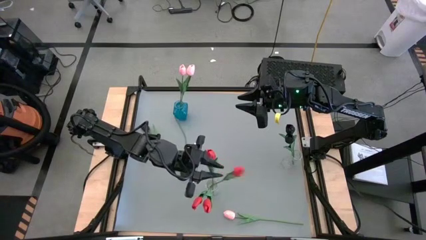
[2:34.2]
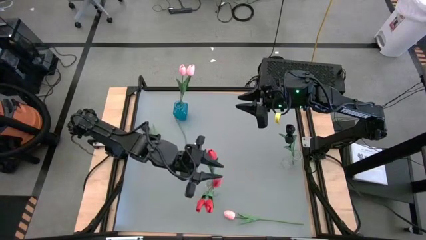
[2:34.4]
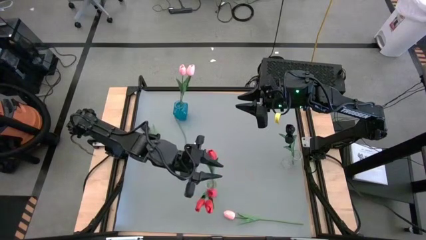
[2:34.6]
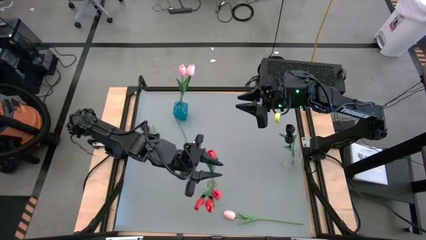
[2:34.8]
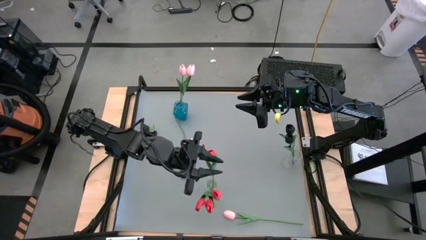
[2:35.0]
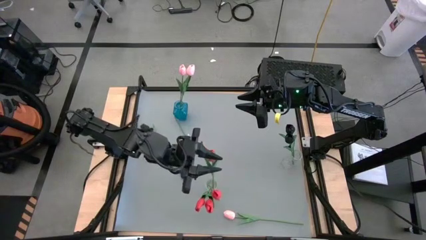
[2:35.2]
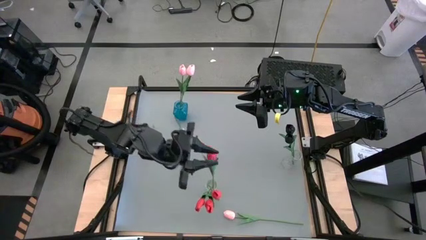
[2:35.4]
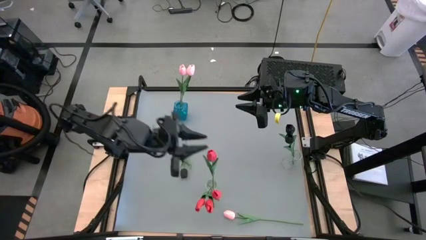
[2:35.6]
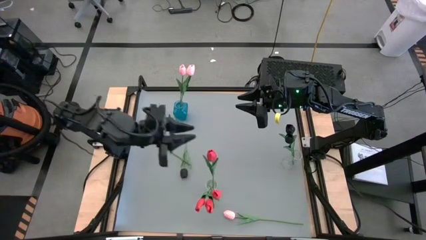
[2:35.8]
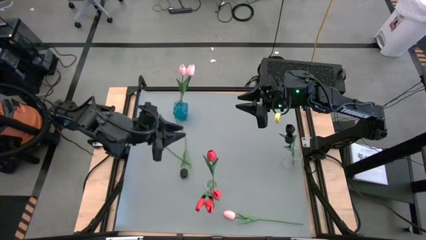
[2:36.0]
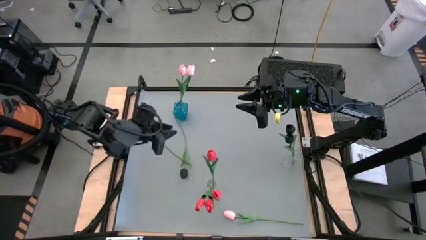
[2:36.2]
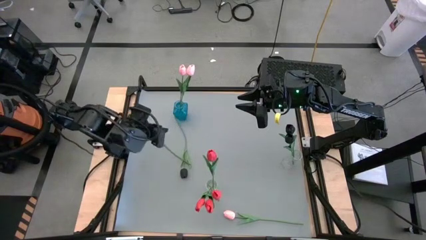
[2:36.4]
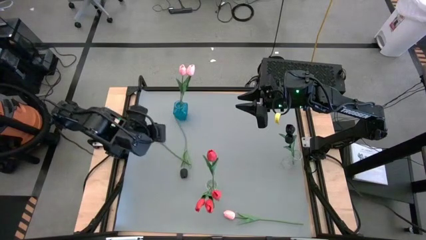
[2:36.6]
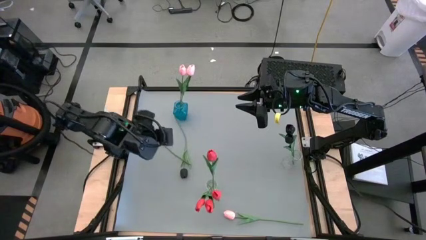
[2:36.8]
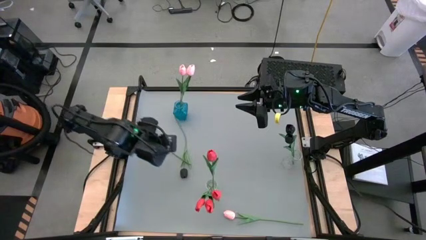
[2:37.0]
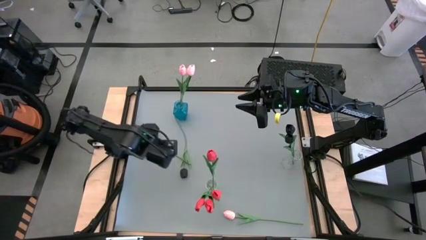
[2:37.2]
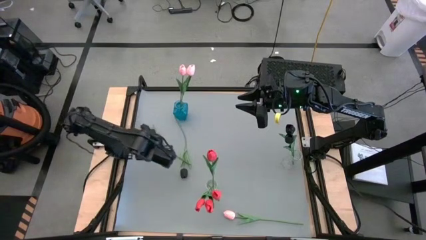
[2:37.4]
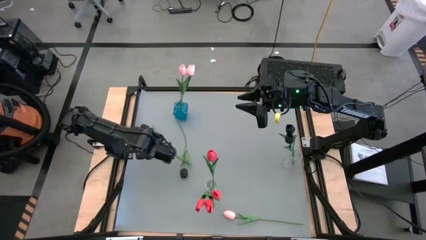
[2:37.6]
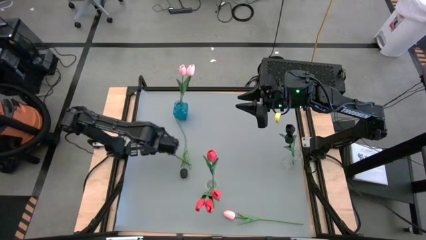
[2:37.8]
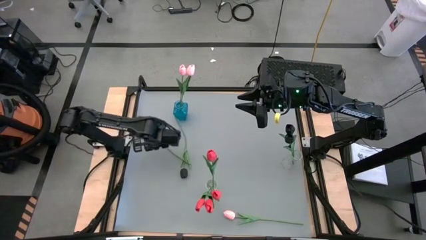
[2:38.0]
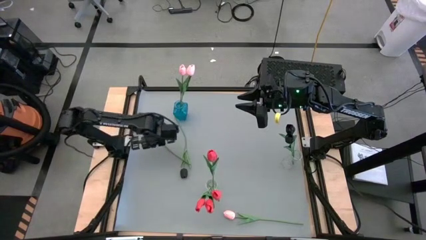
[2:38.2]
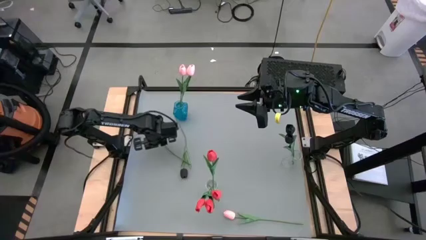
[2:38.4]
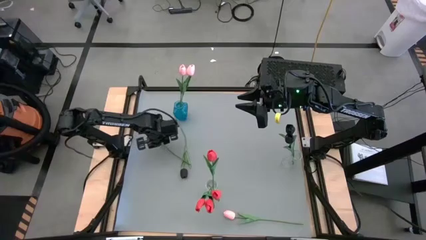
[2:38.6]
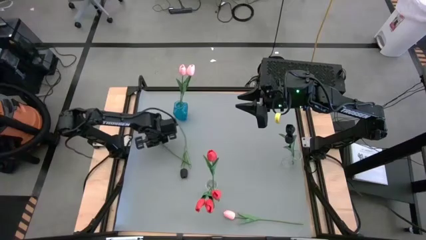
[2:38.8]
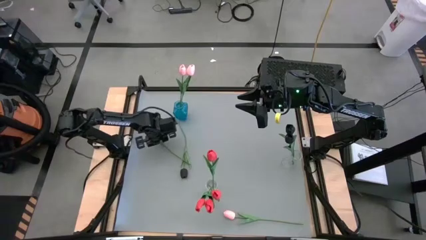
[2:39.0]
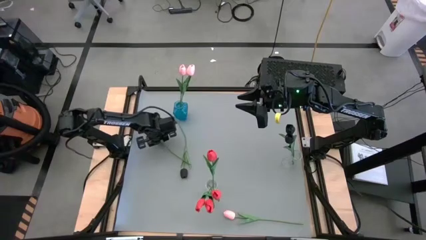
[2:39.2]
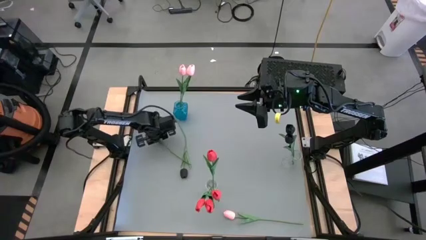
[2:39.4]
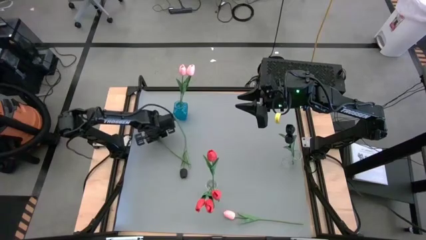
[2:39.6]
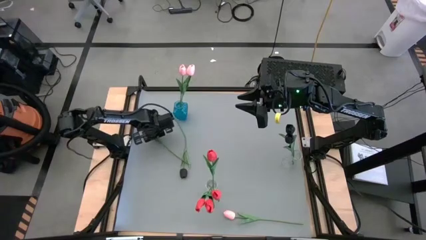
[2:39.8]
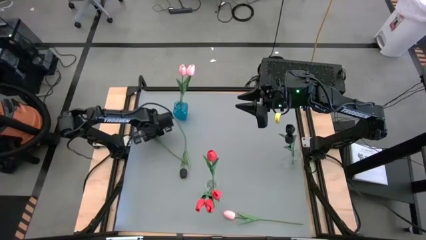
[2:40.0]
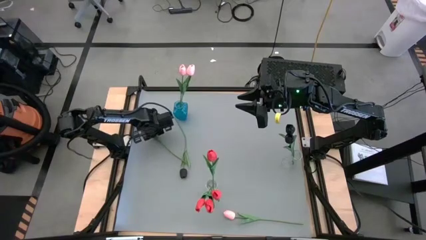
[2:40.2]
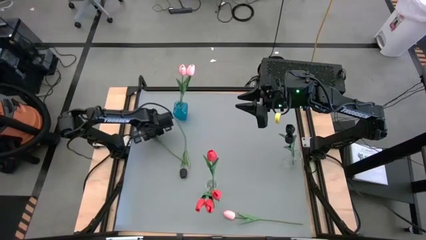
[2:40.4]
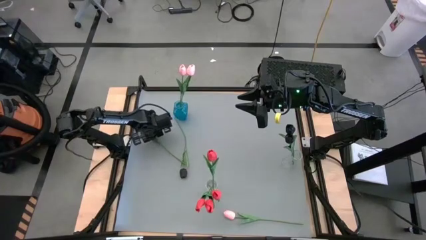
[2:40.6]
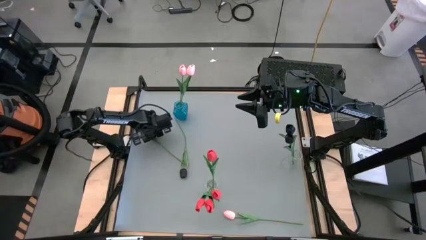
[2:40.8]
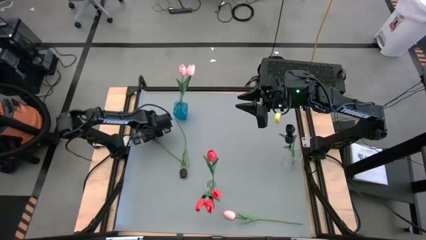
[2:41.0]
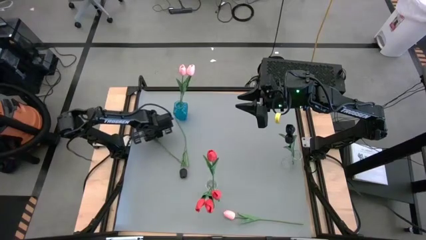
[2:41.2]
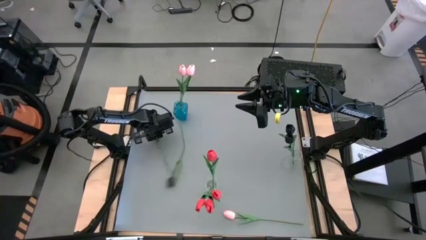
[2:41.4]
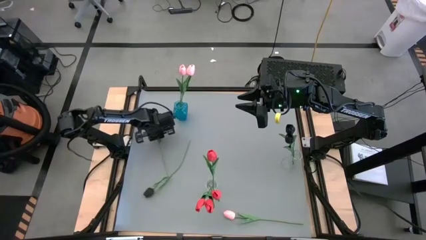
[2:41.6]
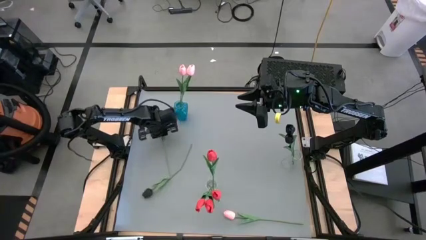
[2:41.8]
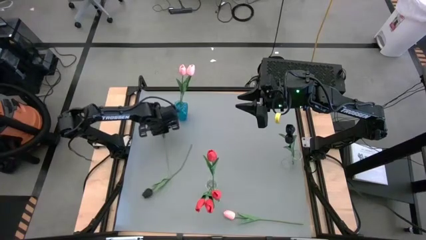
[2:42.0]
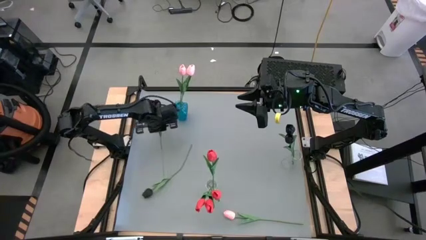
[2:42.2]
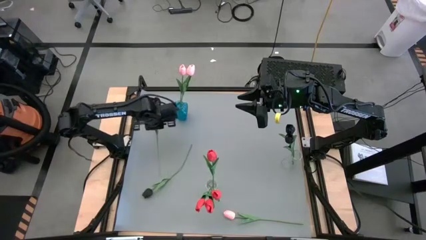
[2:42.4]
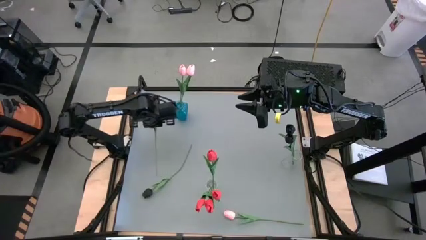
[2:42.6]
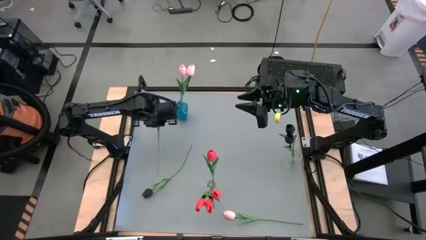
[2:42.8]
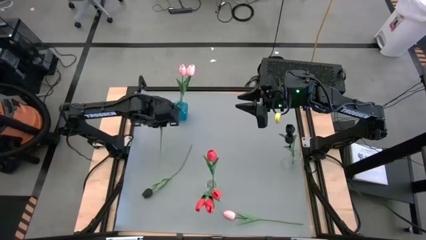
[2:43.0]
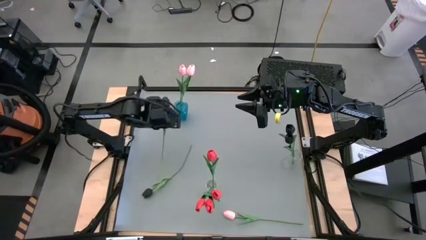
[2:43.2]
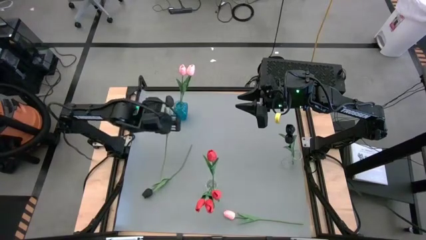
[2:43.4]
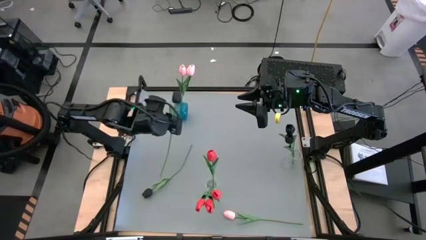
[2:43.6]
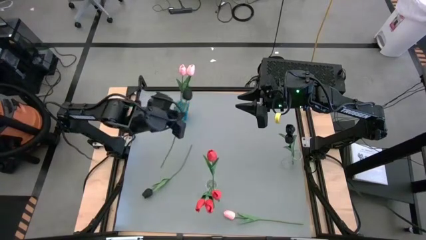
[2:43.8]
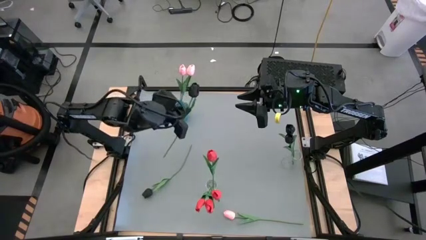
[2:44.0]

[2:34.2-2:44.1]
Task: Sort flowers into vase by color
Put the black flower into the right transparent vase
